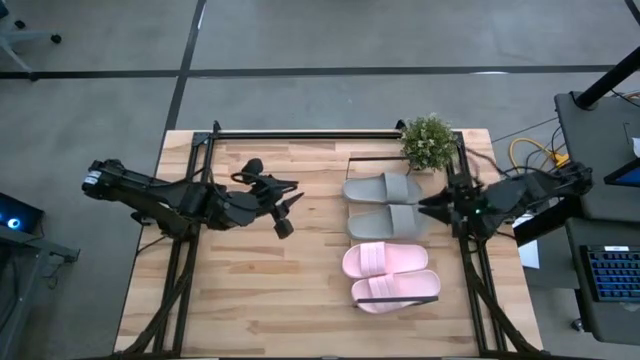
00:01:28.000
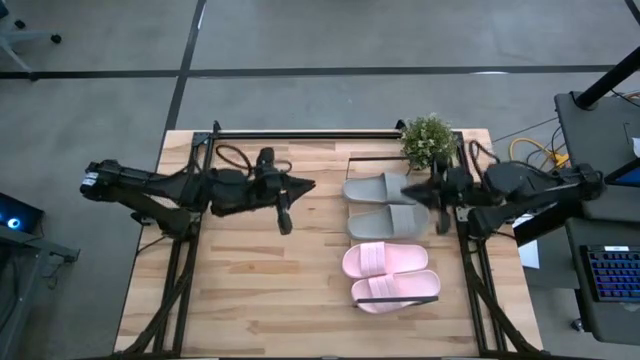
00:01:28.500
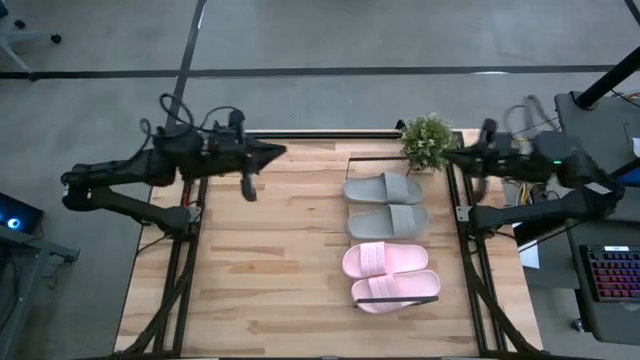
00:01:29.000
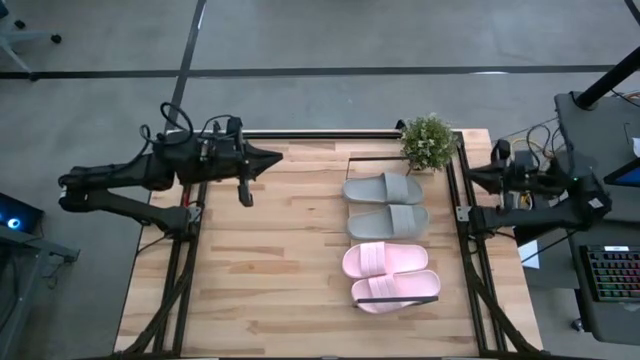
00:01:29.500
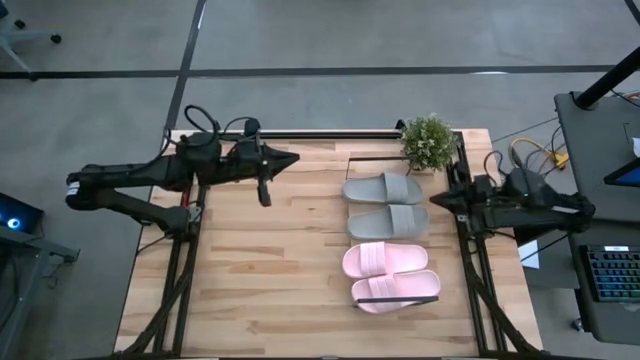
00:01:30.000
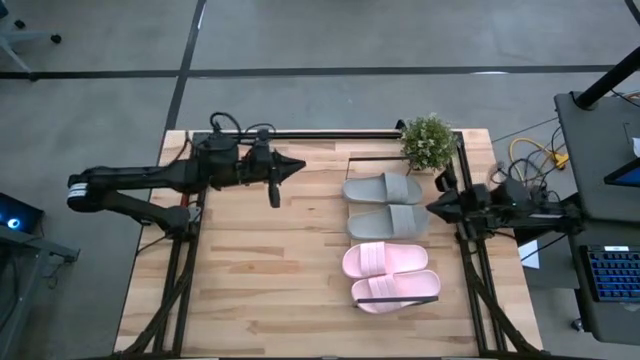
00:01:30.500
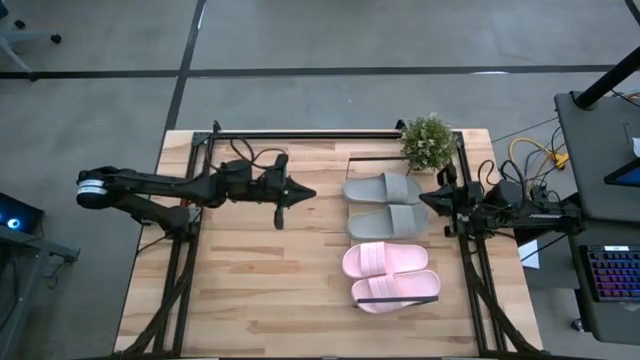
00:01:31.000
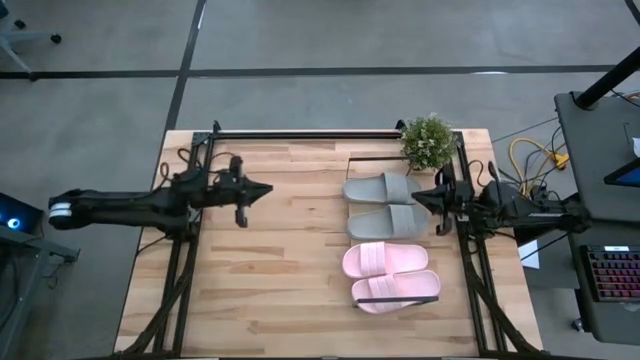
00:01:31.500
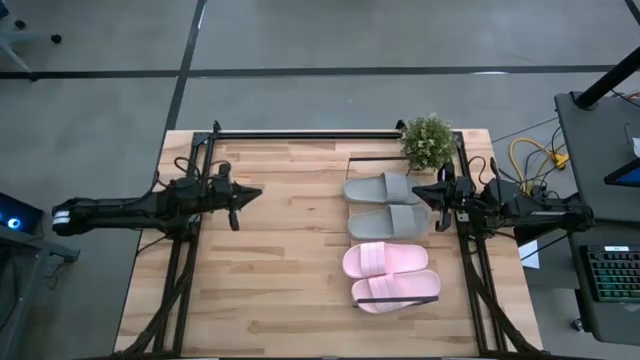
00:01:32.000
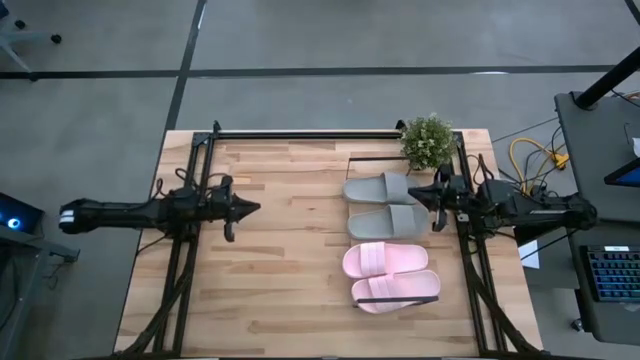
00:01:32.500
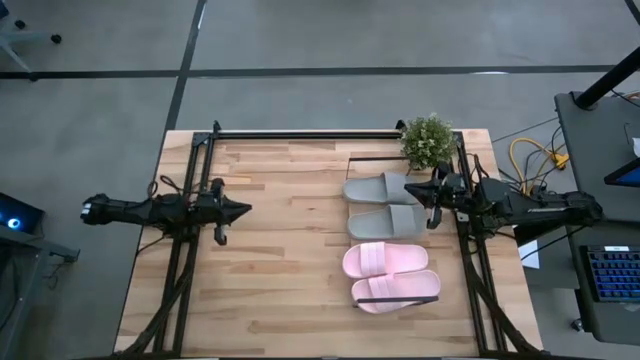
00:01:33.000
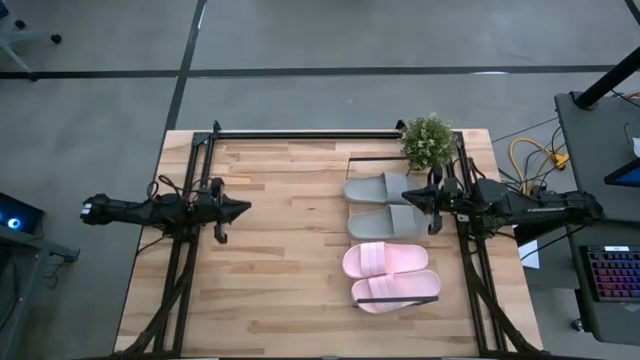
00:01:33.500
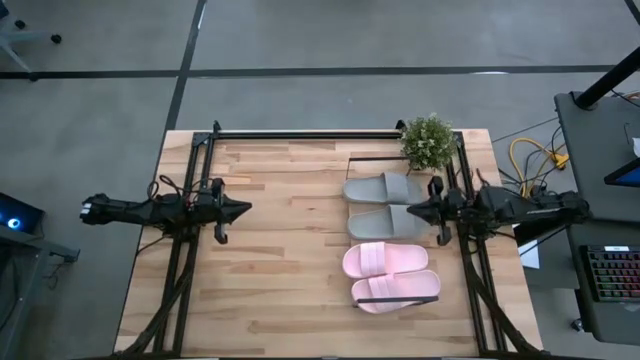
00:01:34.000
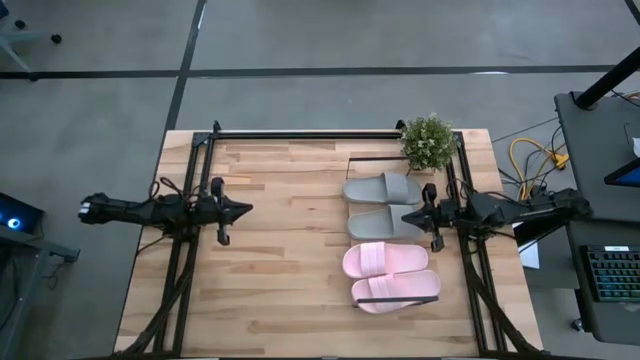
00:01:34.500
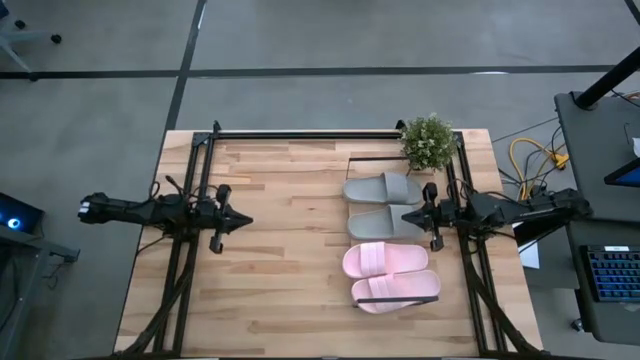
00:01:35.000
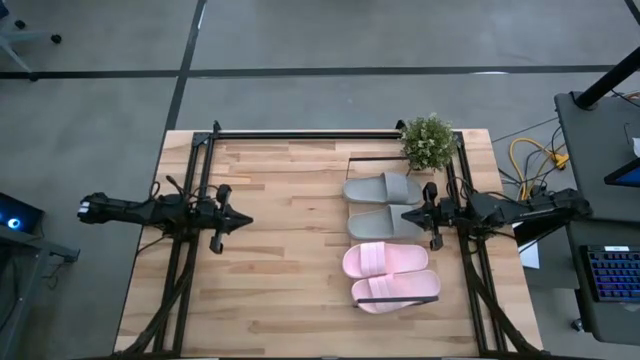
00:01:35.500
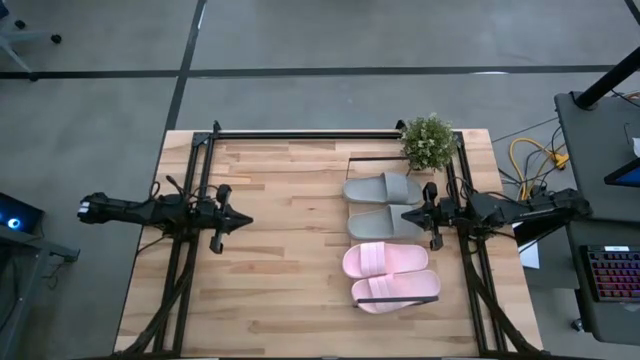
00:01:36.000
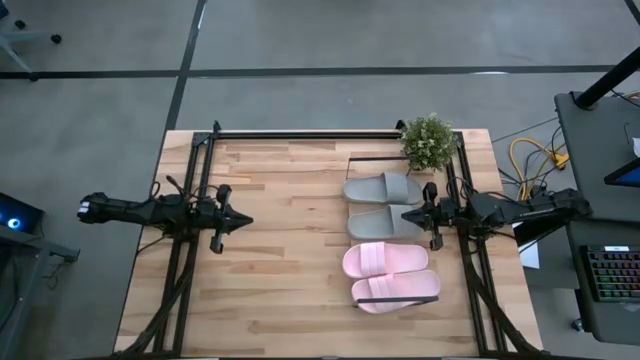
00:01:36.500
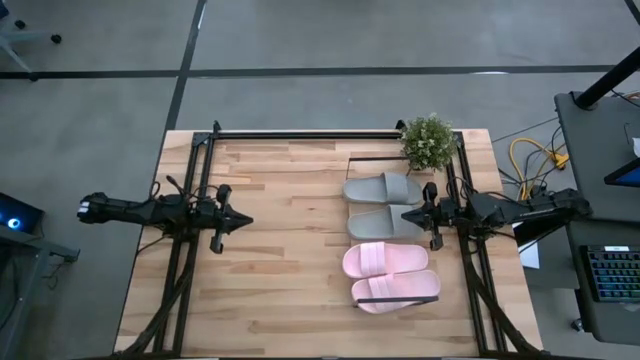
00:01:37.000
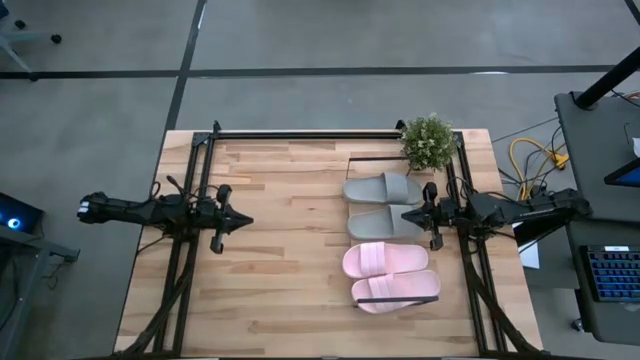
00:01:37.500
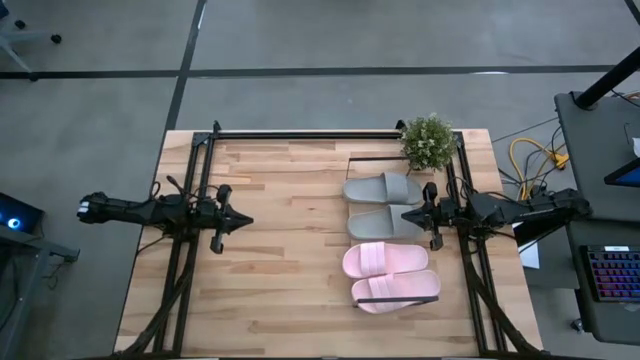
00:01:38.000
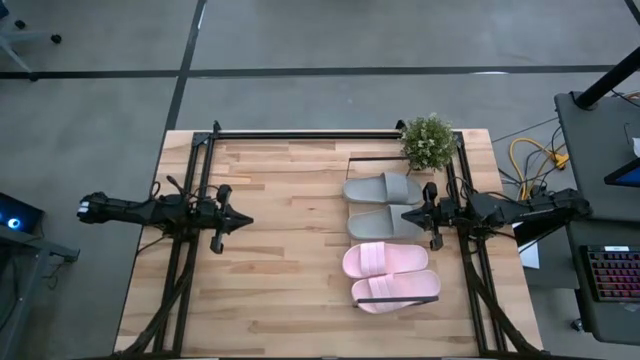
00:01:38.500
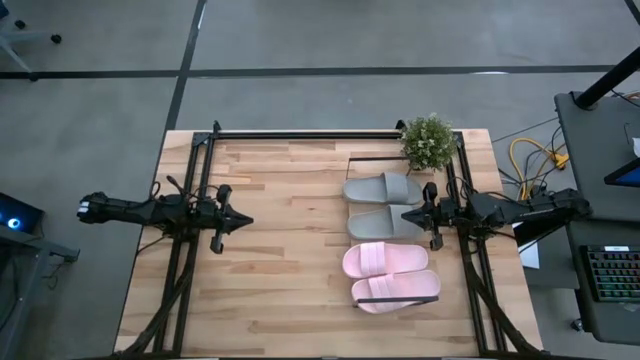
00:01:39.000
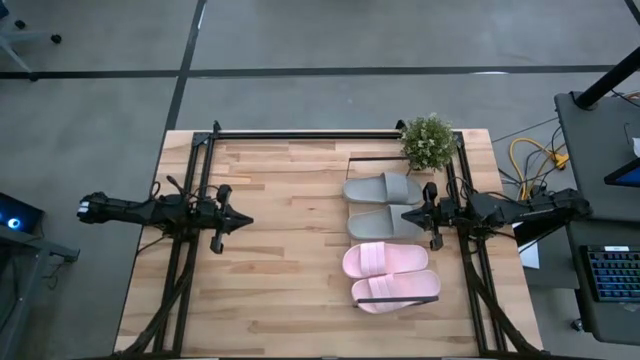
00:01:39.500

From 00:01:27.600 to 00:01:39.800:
Task: Pick and place slides into the shelf
Return to Home Position

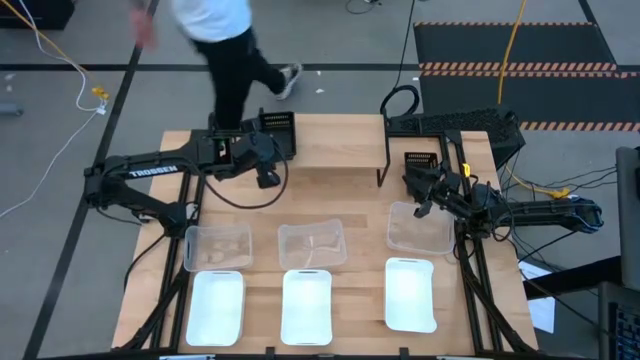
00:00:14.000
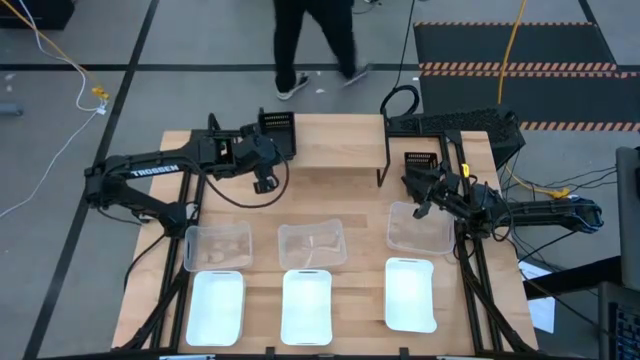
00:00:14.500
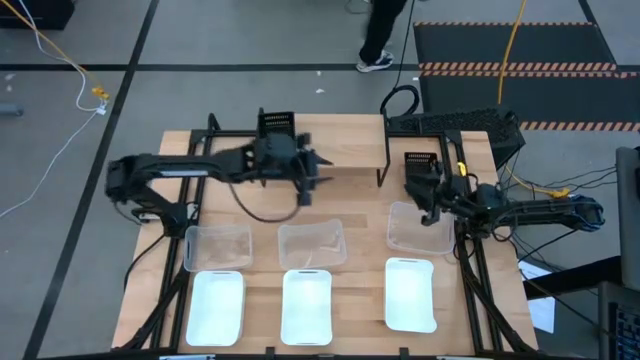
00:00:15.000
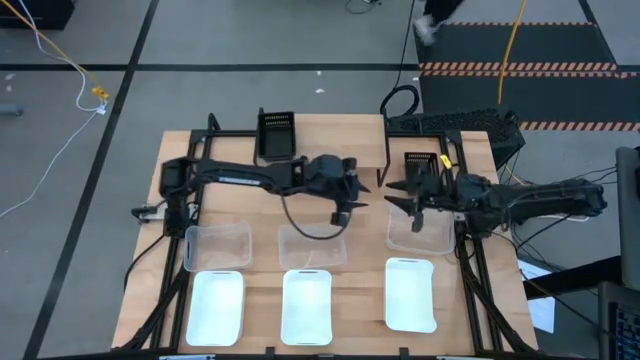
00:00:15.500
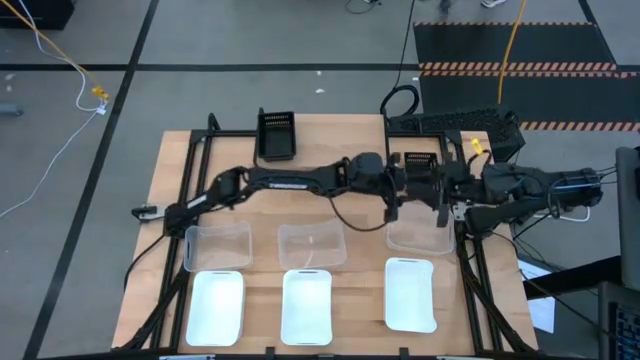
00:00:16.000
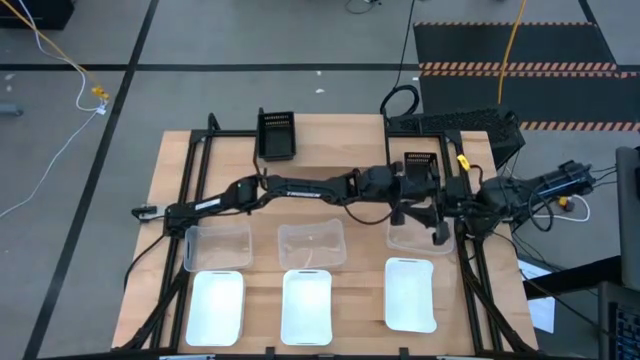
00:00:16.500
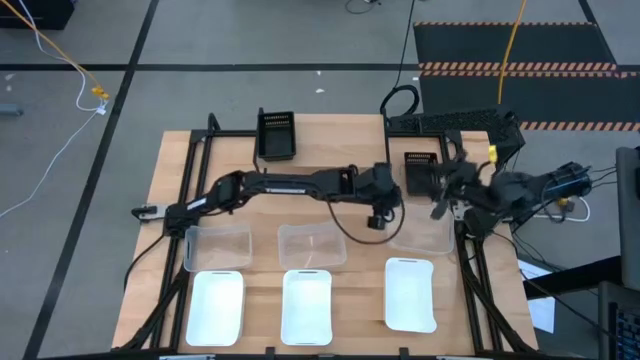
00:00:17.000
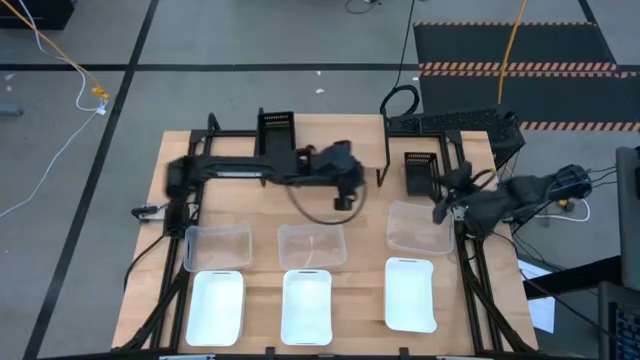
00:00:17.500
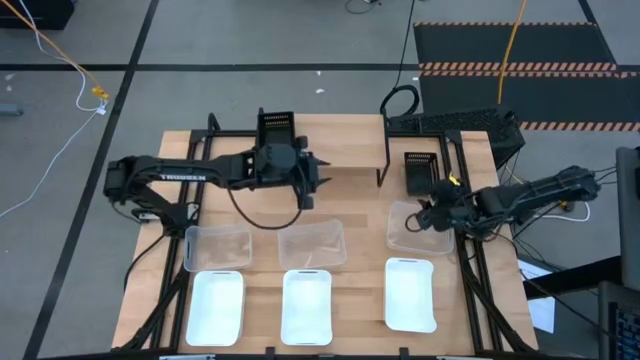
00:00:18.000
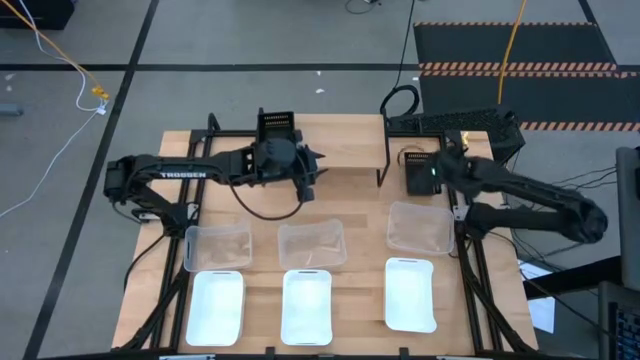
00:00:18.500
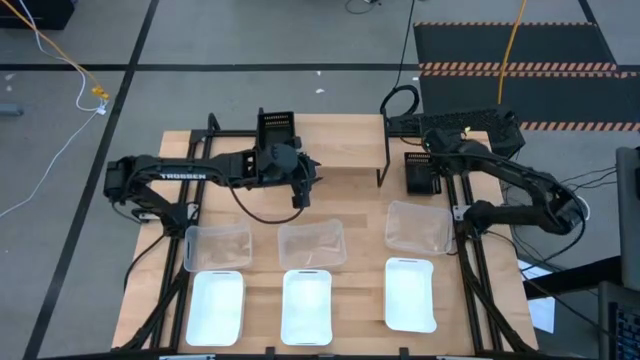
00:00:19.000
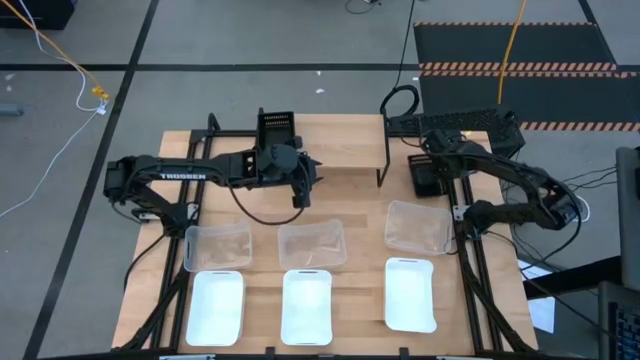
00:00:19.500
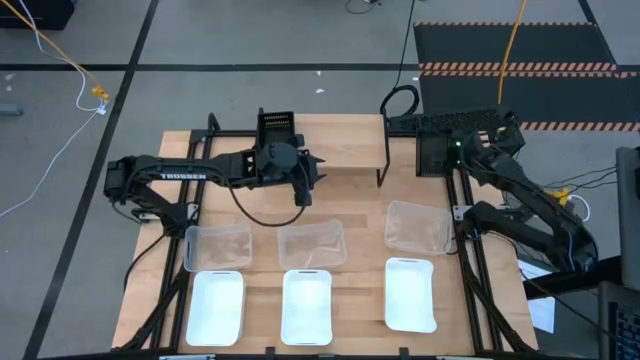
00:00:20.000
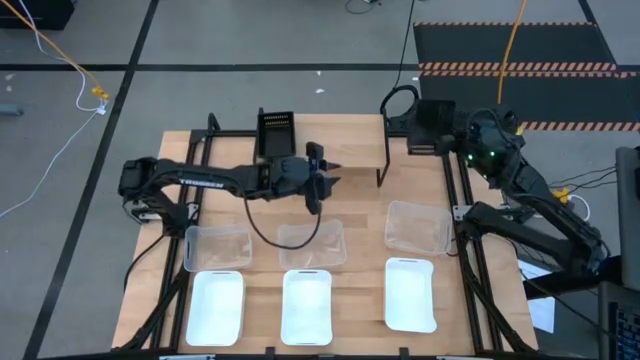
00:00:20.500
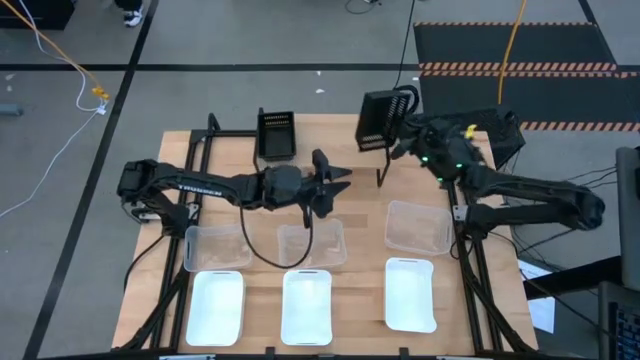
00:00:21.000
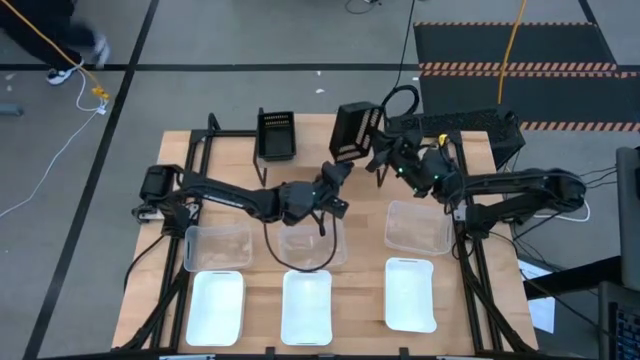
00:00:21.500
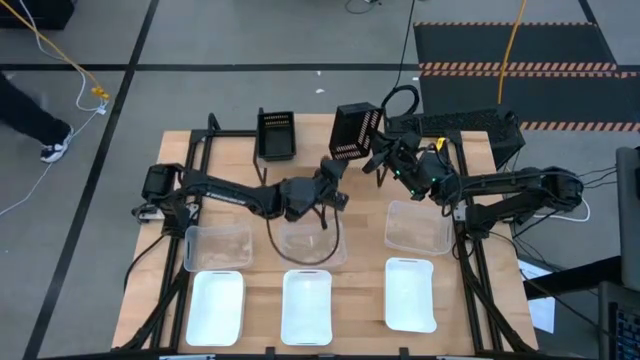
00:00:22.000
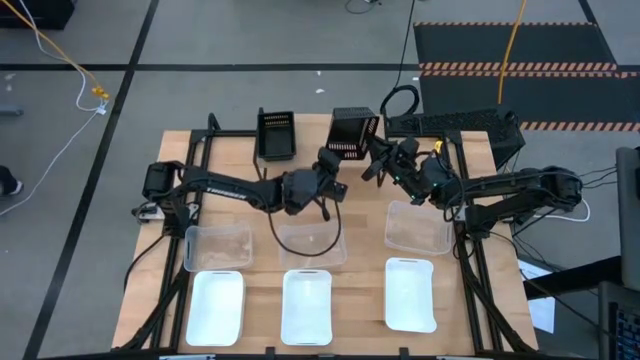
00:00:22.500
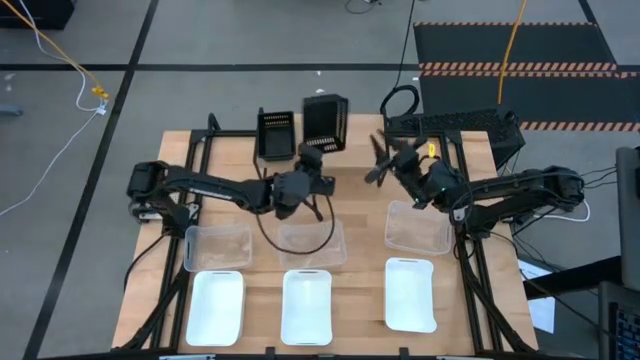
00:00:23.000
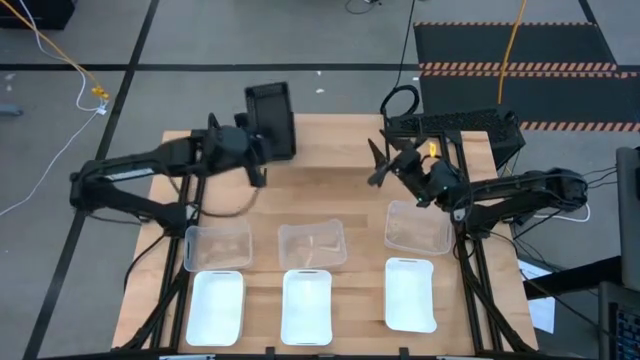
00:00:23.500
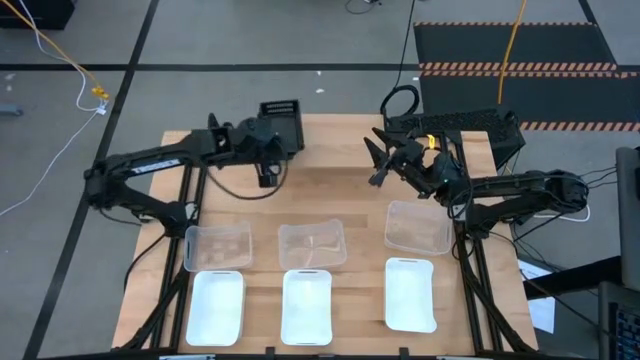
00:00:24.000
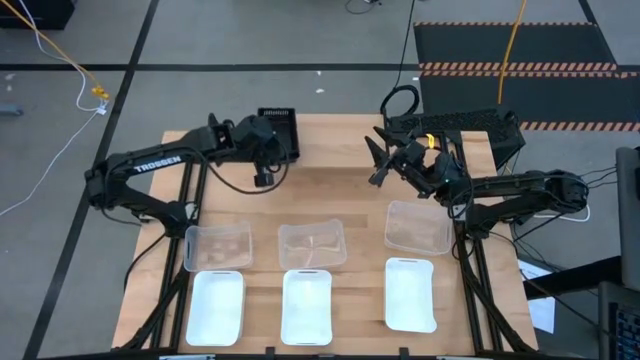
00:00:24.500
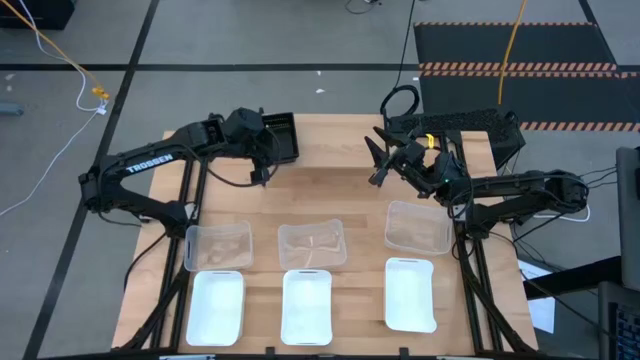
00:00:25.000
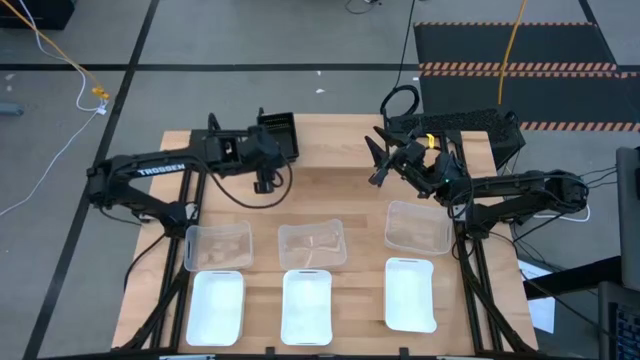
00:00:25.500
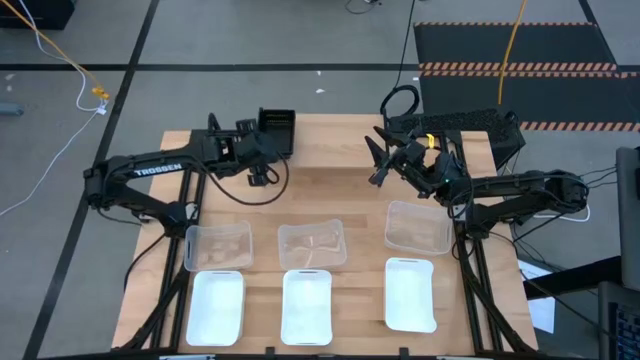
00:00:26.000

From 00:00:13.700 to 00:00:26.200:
Task: Stack baskets on shelf by color
Stack the black bin on top of the other black bins on the shelf
